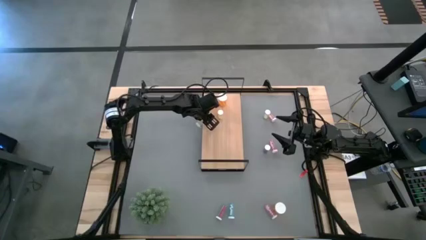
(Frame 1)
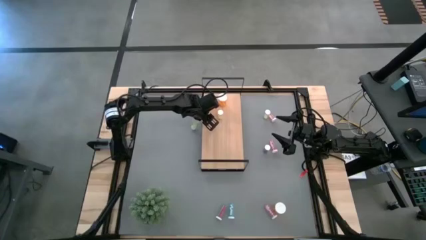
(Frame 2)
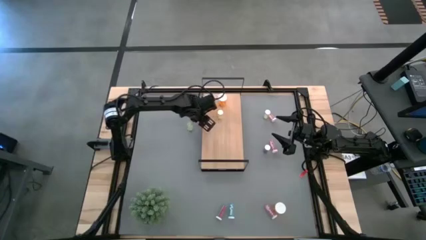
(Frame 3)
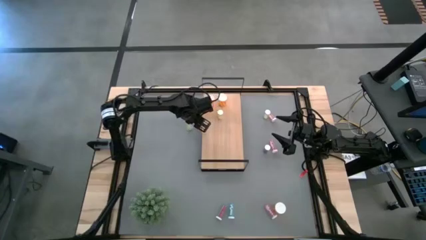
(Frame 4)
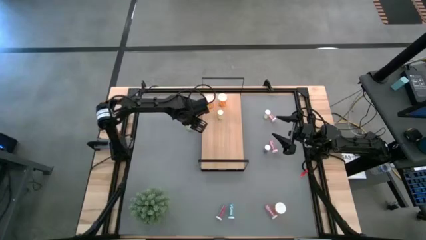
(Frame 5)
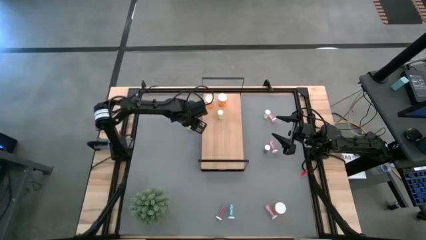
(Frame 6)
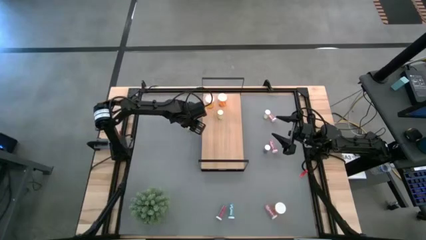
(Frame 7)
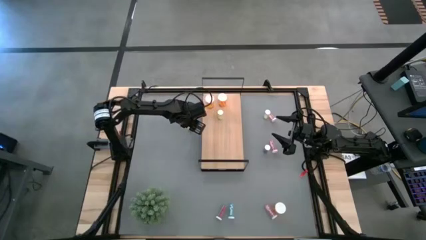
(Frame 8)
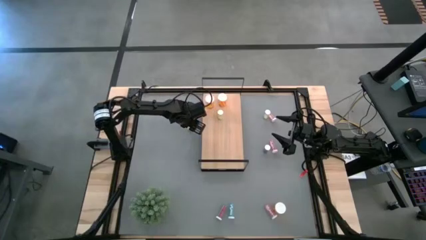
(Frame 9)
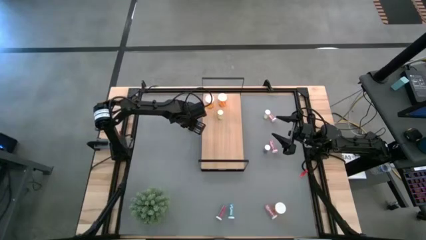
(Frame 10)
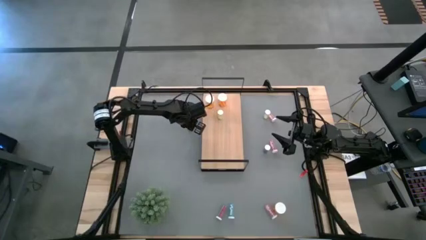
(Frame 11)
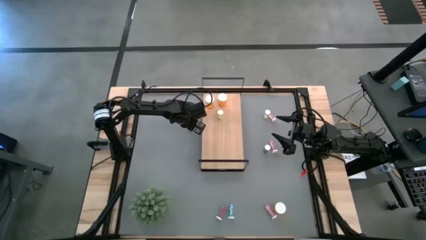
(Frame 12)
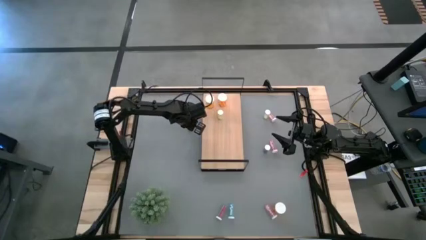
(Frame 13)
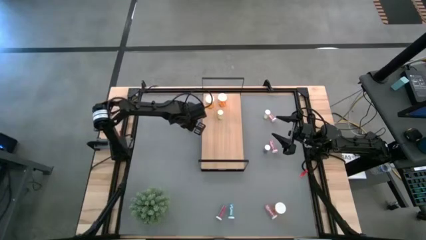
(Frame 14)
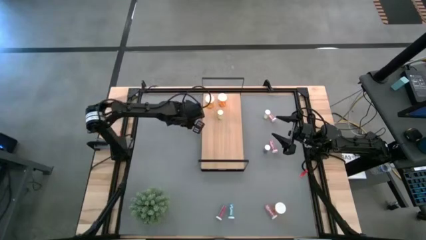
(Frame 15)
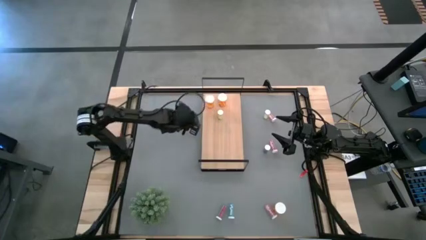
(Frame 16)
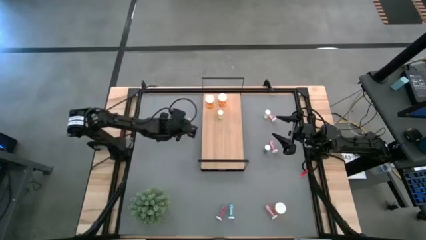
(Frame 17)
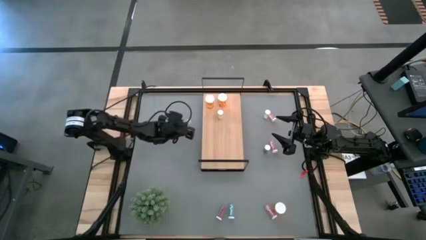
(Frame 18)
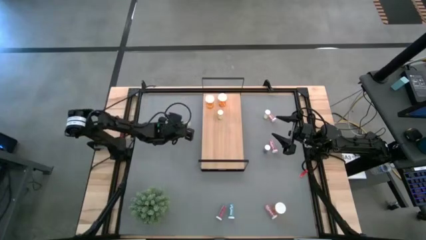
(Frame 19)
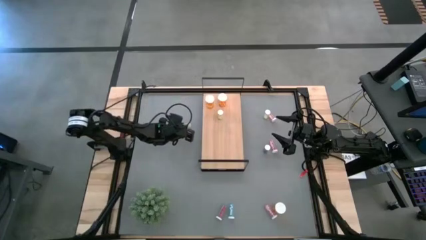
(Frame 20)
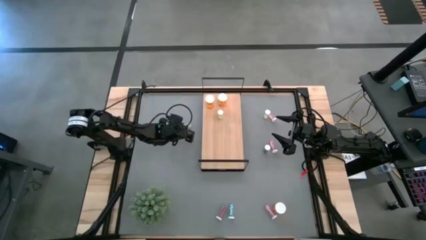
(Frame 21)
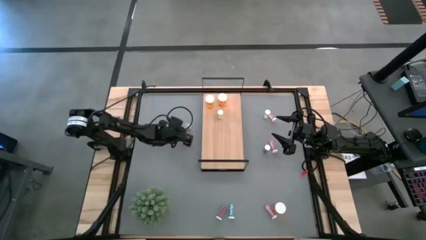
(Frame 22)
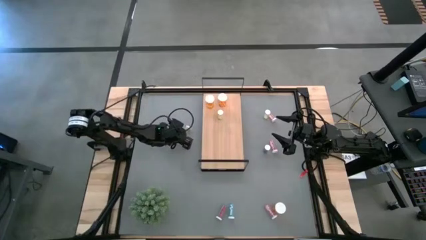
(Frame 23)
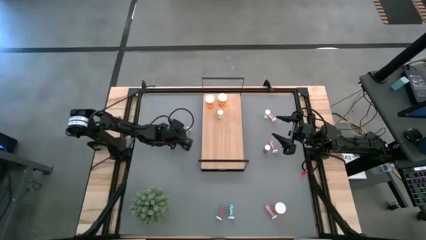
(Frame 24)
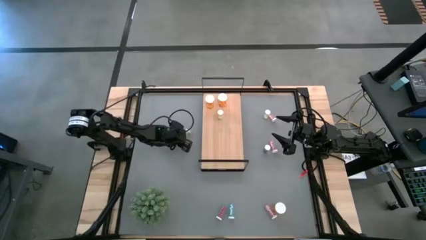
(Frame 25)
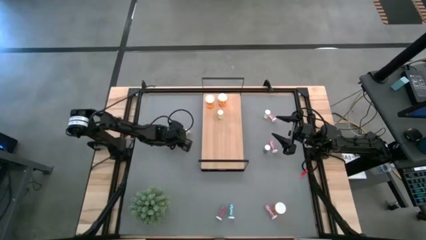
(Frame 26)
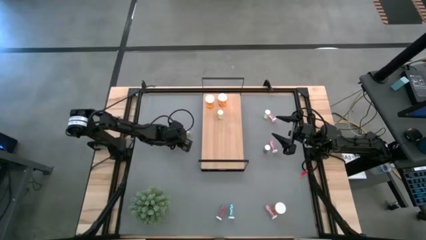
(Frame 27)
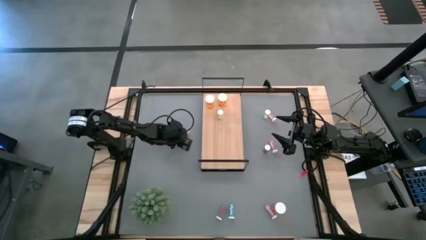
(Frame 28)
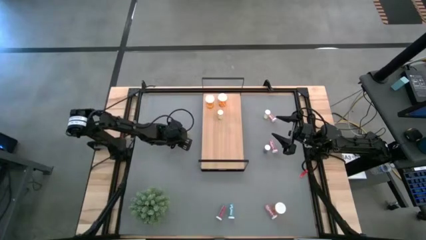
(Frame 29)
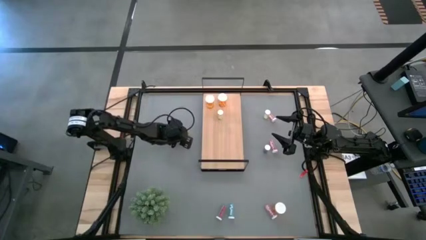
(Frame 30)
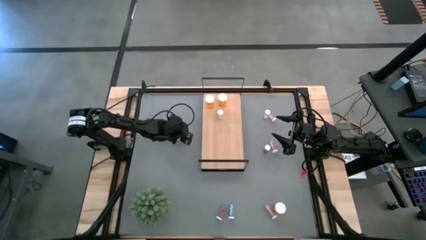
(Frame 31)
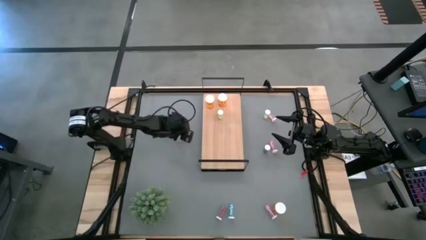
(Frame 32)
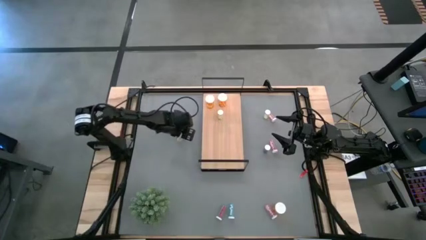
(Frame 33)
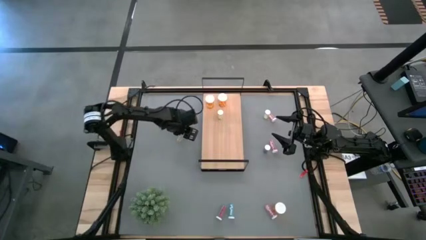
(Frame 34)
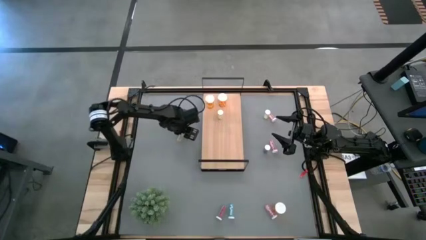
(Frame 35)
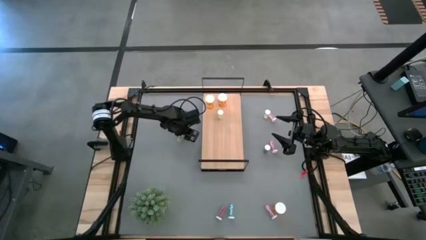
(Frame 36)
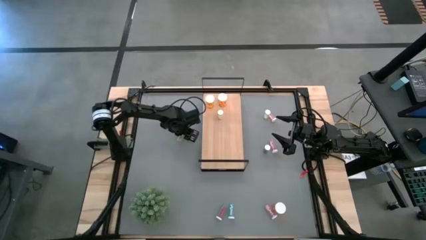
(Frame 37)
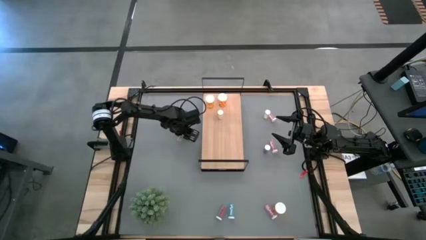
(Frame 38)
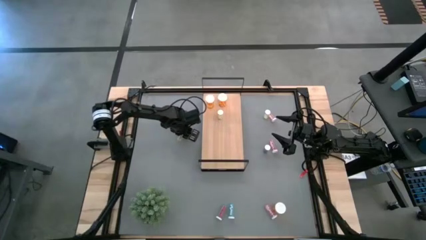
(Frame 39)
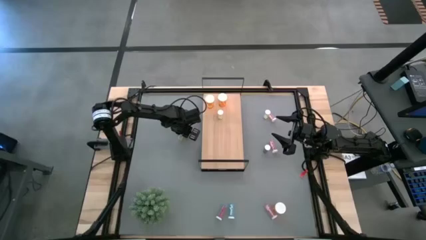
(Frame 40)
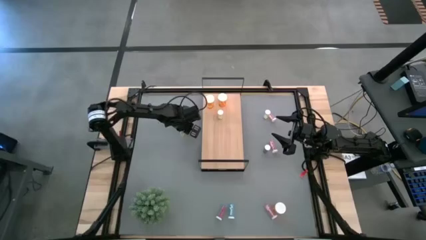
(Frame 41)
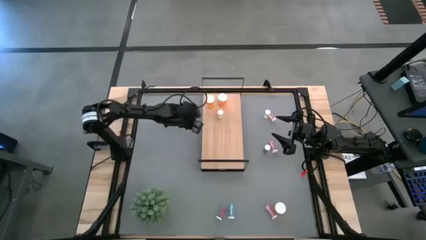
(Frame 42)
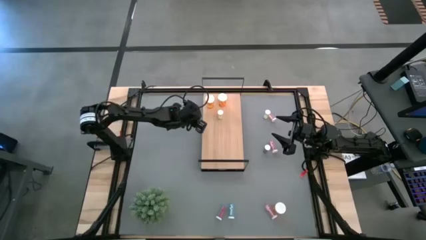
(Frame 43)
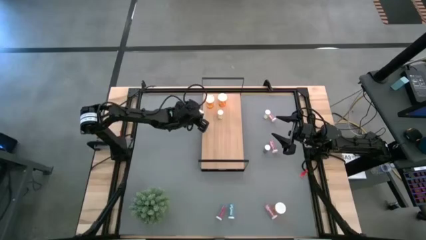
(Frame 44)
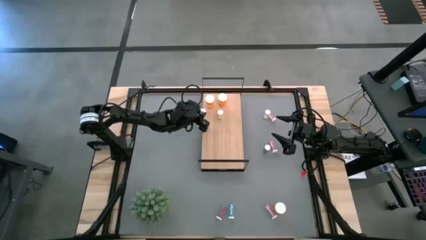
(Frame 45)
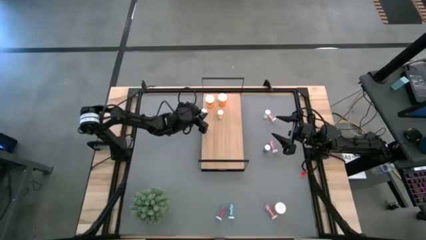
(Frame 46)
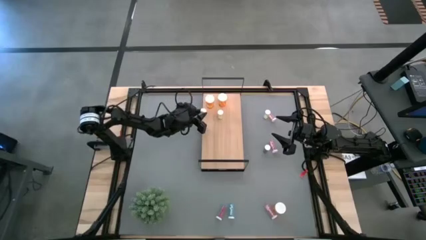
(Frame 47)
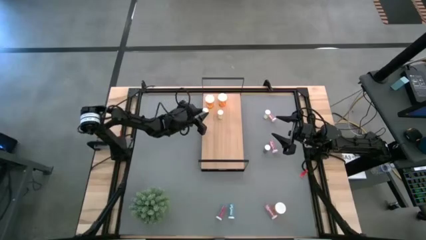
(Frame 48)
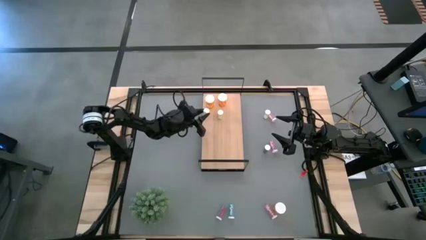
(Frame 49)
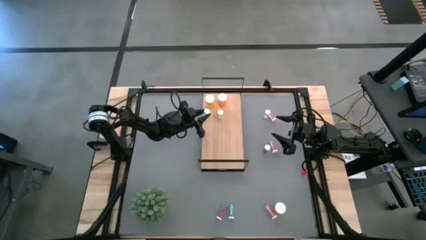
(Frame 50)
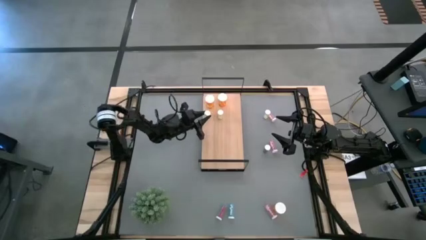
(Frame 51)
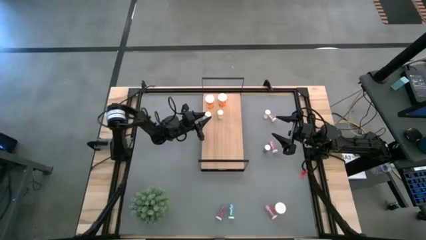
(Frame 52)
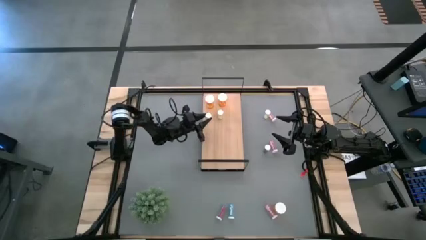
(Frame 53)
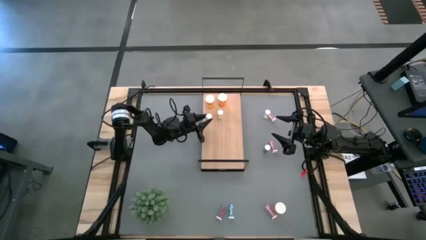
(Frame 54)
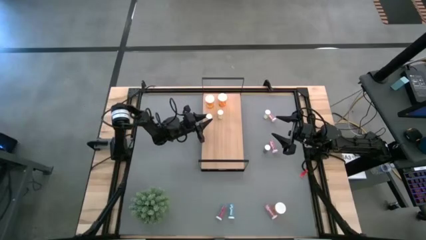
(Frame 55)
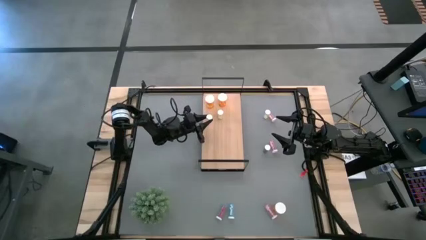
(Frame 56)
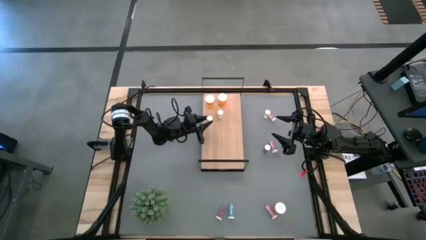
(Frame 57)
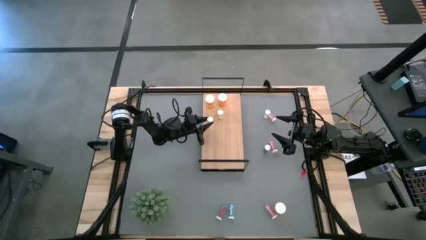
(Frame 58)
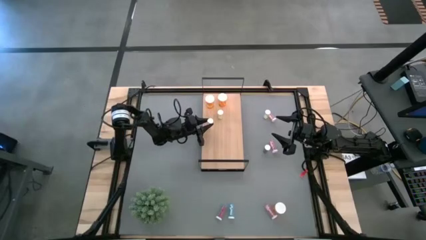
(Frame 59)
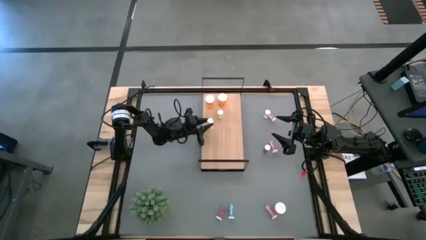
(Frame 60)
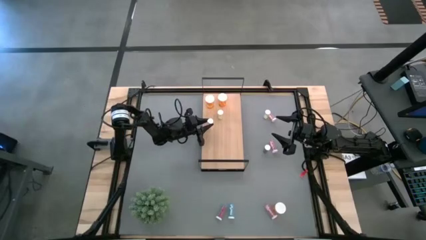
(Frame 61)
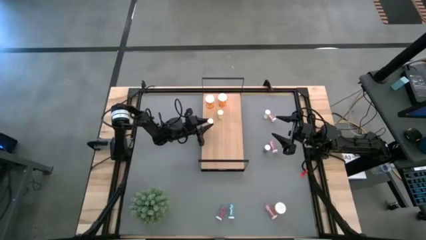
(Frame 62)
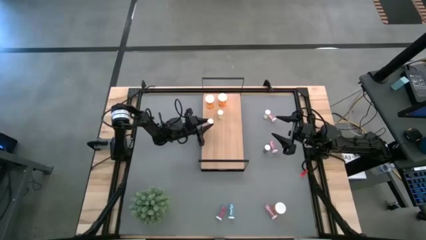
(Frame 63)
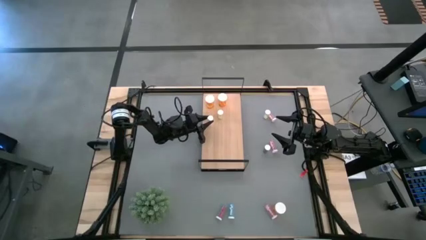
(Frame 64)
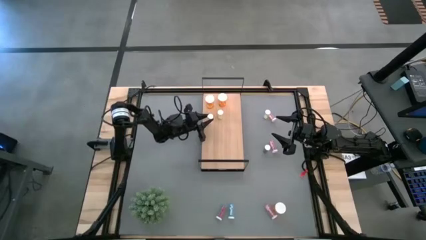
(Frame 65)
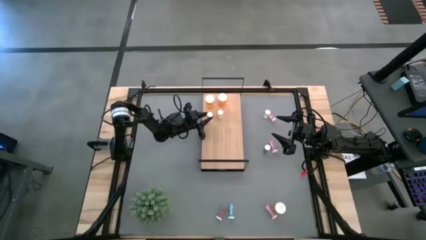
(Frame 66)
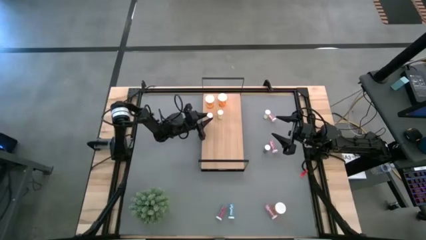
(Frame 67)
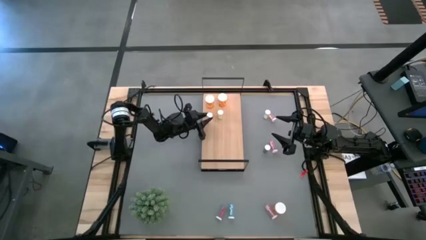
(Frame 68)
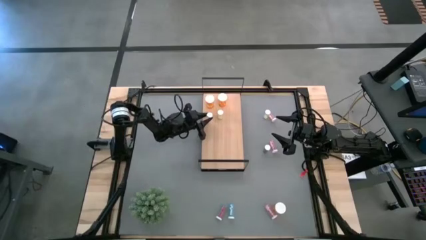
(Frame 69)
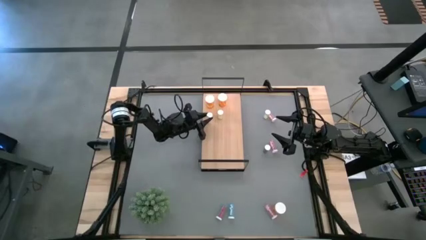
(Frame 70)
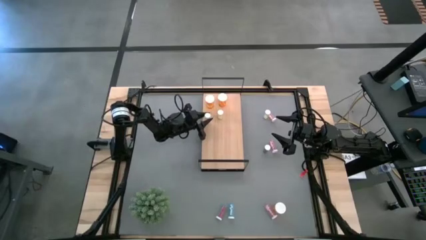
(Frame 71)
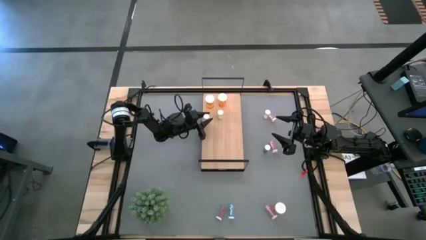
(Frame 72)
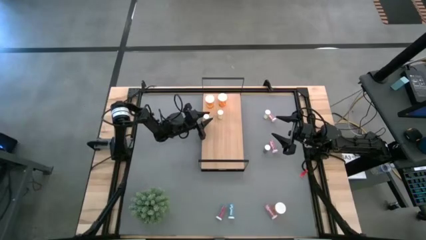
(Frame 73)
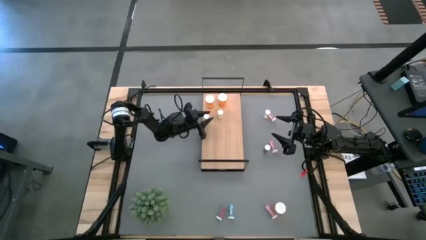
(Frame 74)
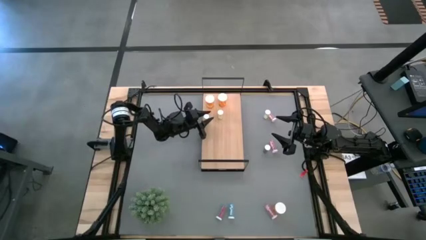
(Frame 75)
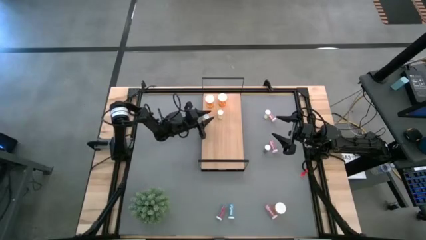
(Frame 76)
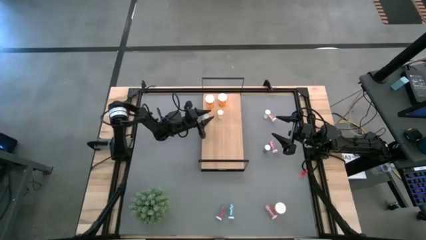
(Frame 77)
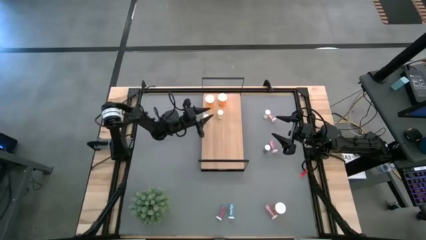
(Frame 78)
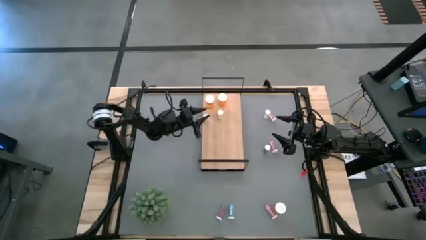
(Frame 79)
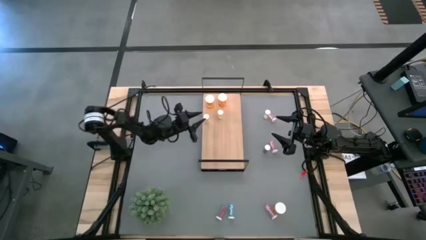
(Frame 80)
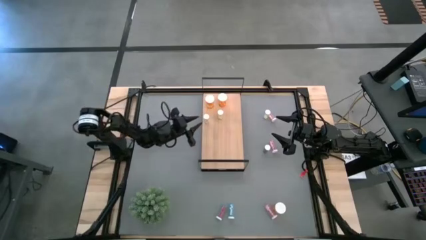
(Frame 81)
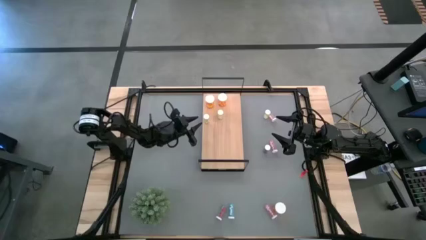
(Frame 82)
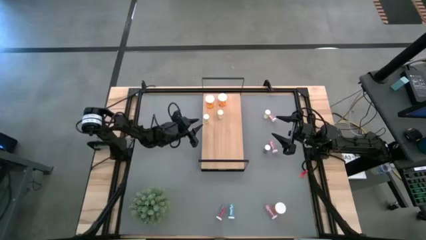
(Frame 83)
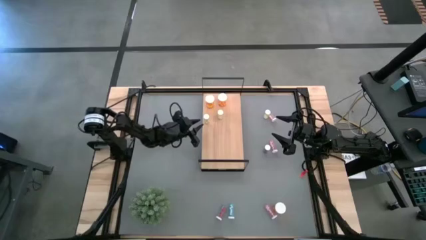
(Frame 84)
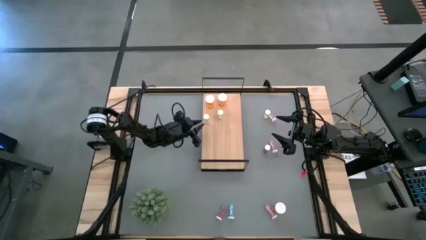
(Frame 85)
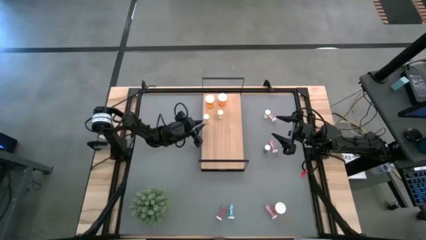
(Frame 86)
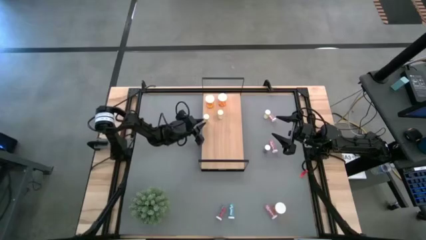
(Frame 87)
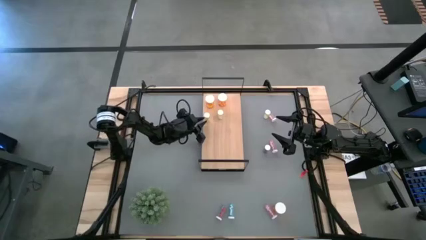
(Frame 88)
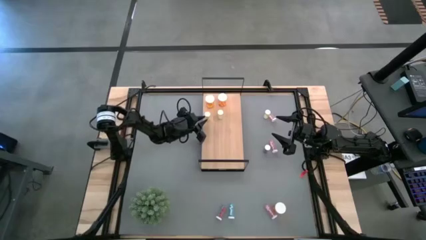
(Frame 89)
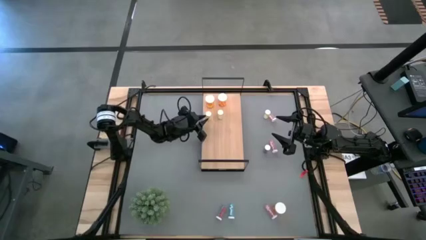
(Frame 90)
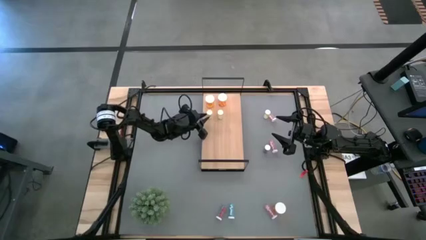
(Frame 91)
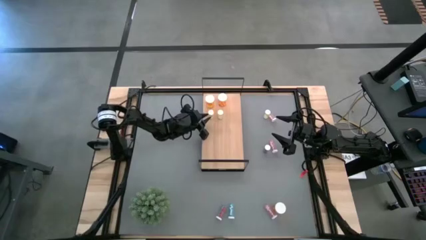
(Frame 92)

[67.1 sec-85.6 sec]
Task: Pick and place medicine bottles onto shelf by color
Put the bottom yellow pill bottle on the shelf aligned with the other yellow pill bottle
